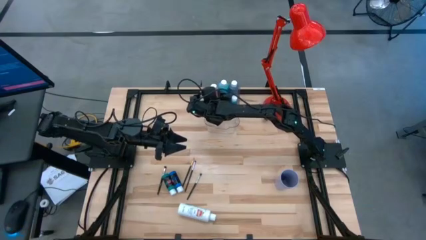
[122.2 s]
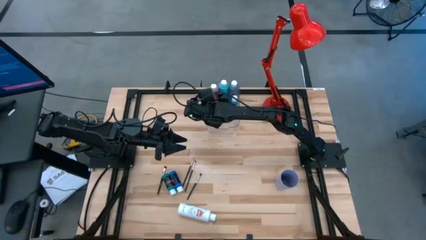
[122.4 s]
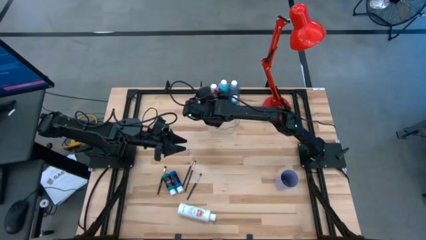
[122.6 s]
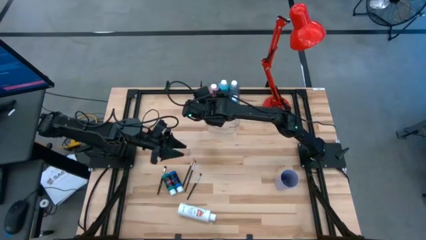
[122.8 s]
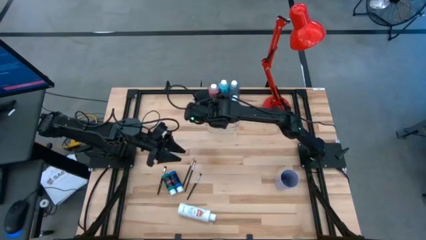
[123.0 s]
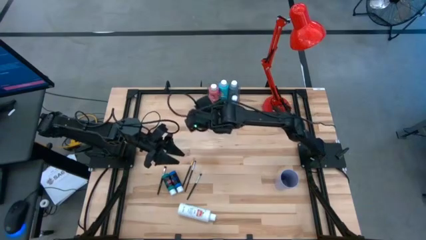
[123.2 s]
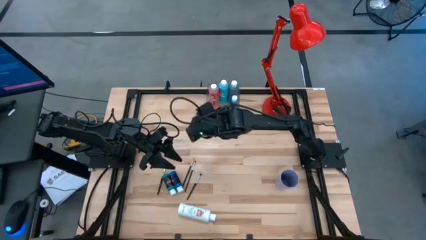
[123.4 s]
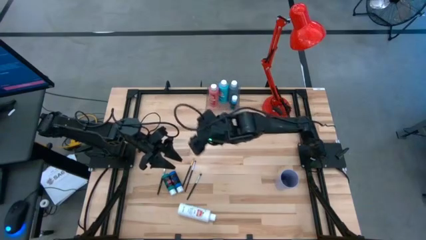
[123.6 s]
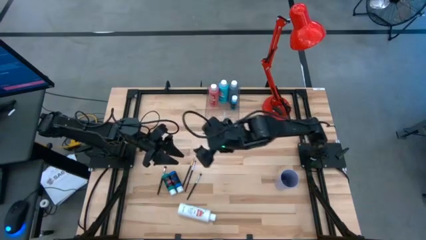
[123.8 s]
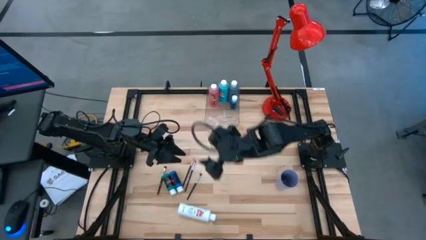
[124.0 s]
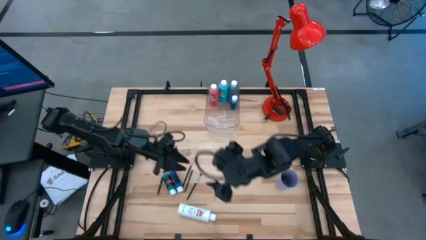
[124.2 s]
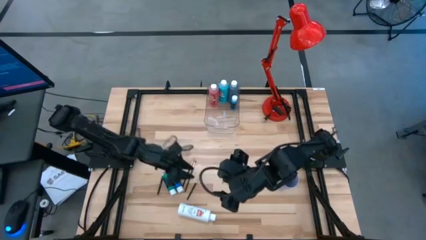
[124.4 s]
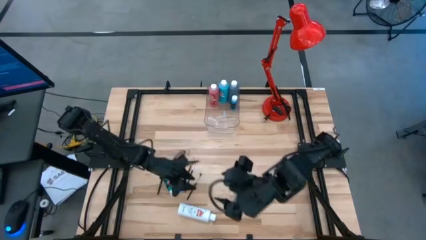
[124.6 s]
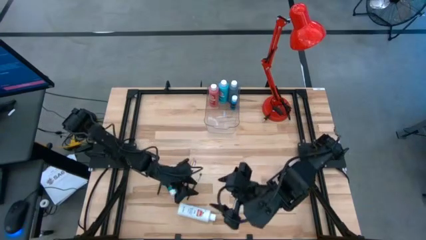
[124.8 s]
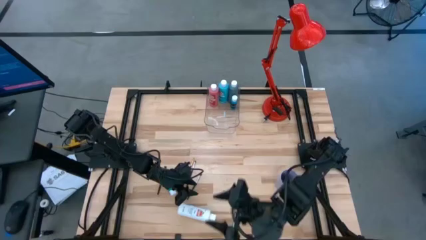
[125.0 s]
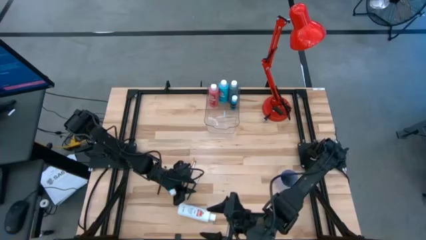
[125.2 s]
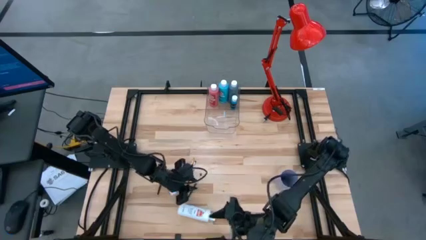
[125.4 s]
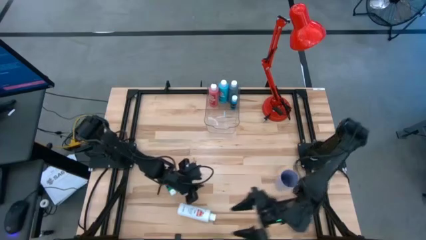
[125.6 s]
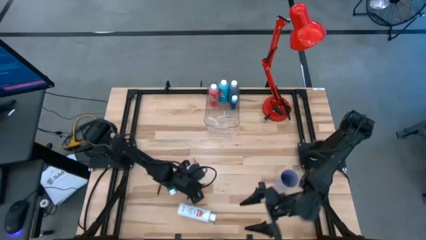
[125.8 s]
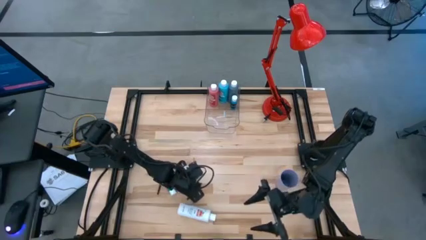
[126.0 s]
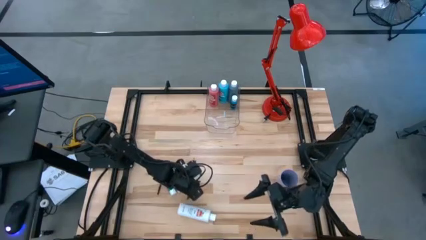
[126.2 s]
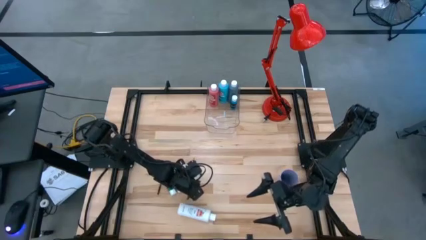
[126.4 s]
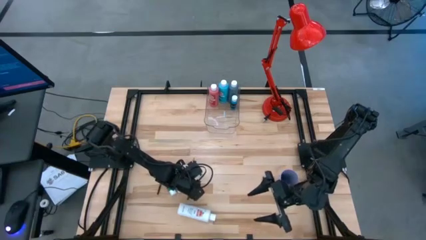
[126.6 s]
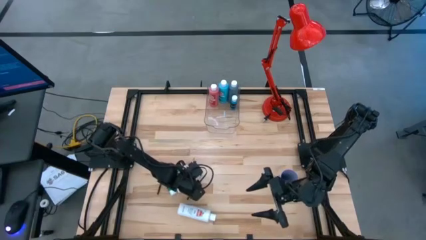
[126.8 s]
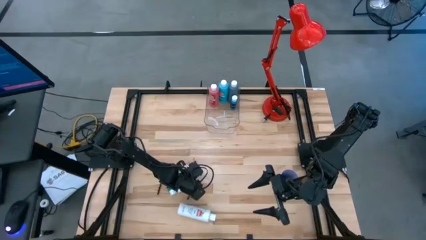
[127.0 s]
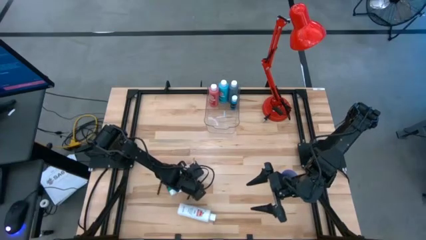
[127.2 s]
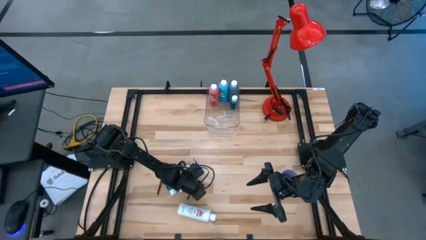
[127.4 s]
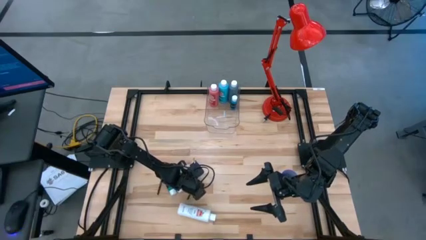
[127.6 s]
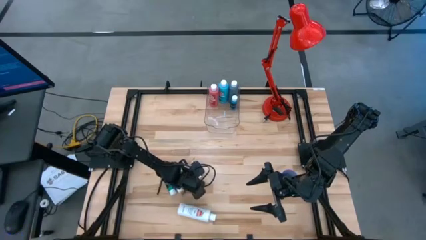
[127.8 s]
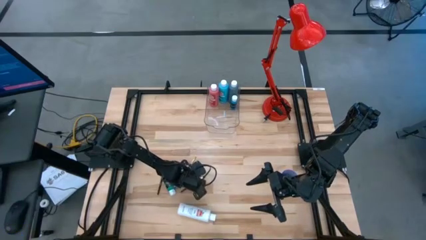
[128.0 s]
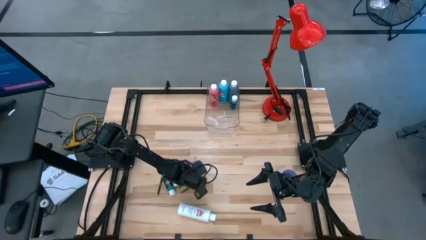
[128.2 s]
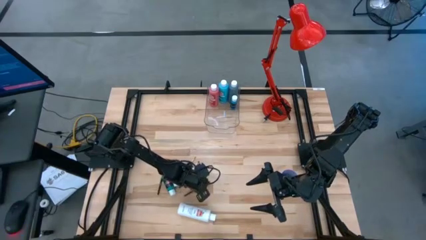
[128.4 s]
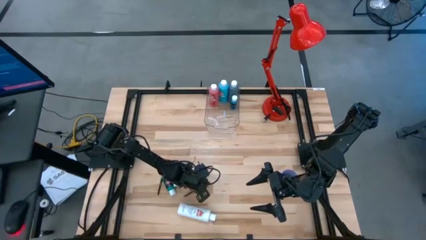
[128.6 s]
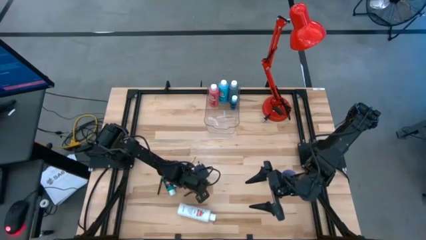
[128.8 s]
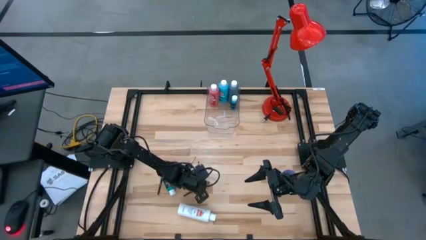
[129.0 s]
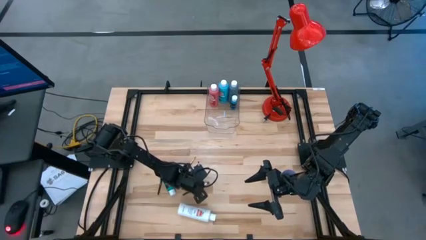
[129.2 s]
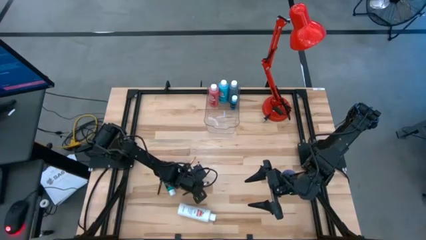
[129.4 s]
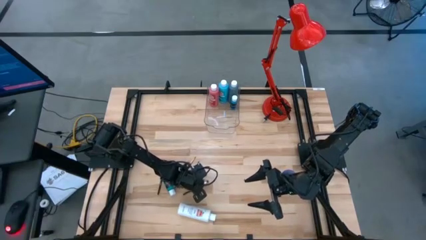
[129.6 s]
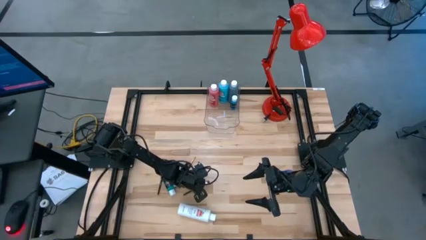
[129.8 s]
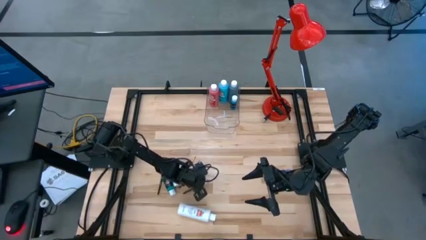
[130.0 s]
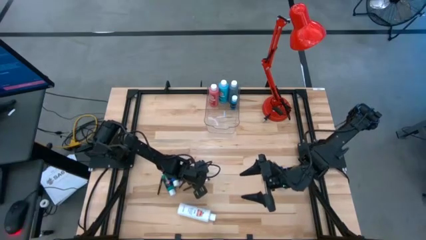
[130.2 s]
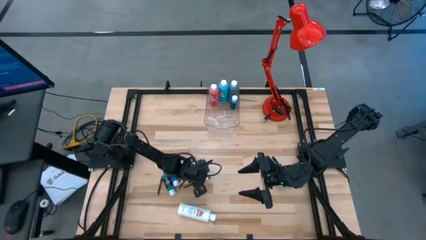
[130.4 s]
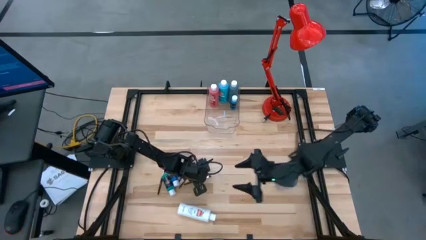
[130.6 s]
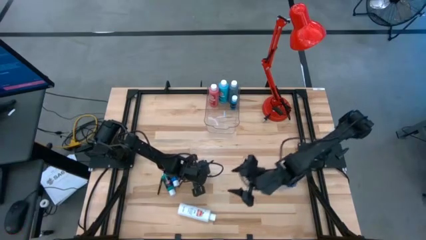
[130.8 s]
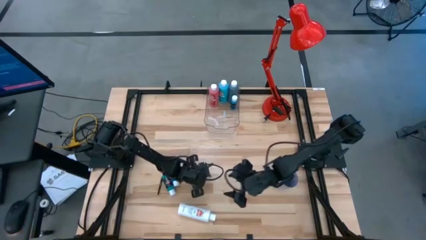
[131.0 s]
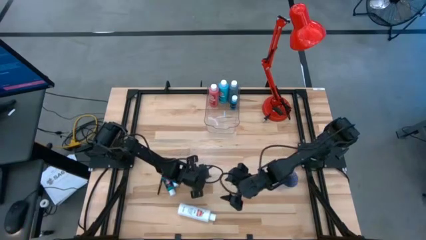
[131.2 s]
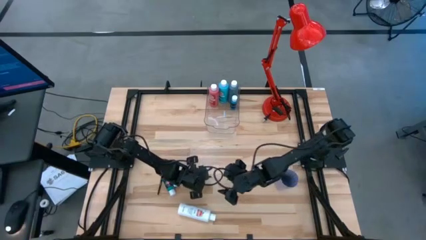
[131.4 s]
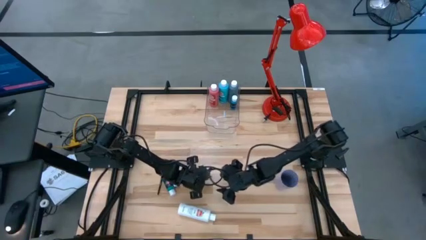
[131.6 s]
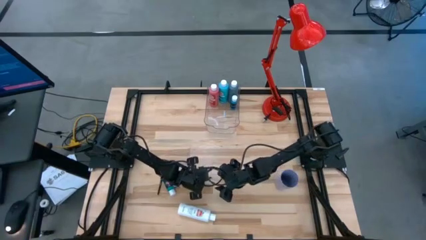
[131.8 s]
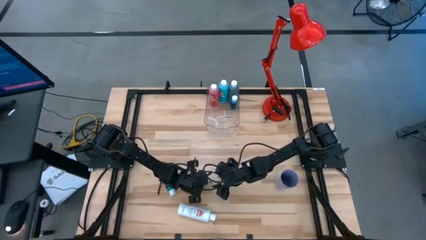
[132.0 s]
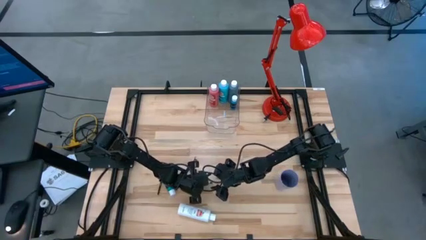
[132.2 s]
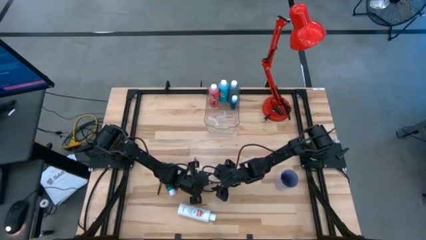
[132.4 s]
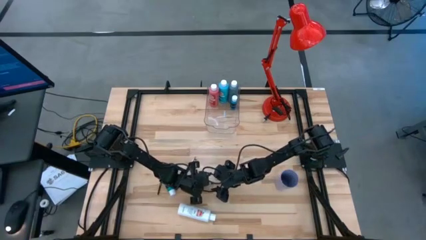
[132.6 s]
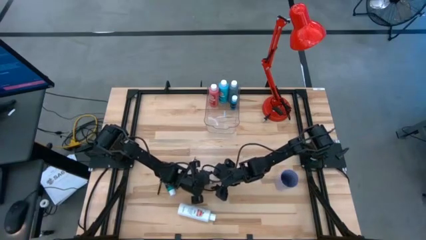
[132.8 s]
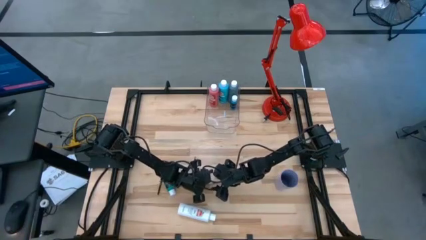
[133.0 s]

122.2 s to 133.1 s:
Task: Pick & Place Paint Supplies
Put the silver paintbrush into the purple cup

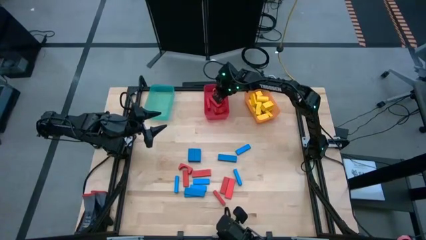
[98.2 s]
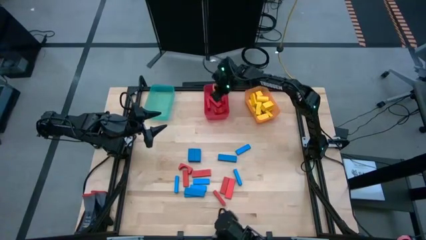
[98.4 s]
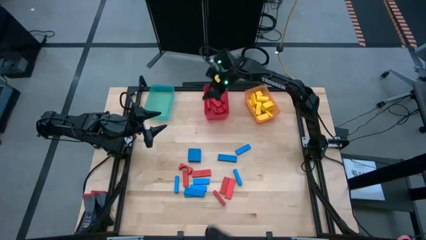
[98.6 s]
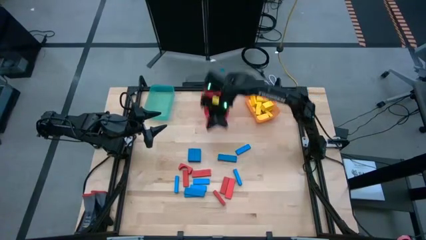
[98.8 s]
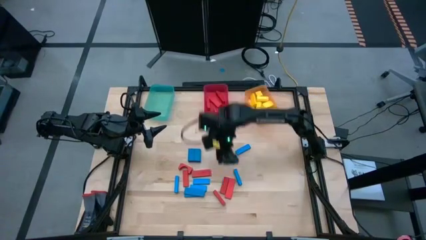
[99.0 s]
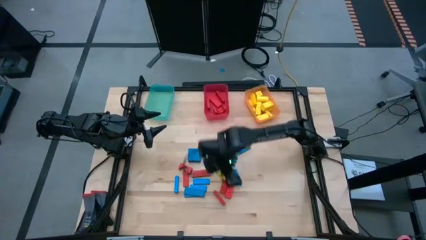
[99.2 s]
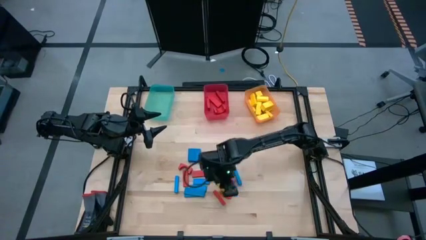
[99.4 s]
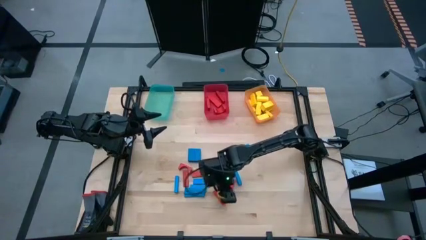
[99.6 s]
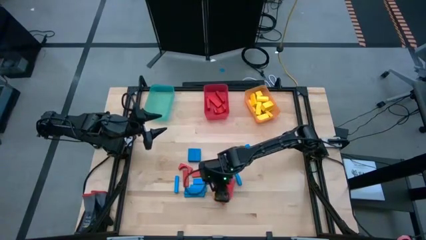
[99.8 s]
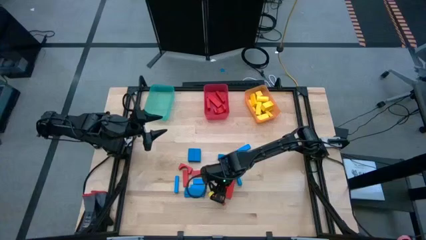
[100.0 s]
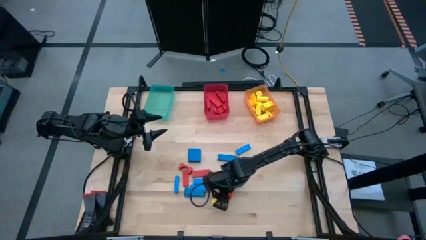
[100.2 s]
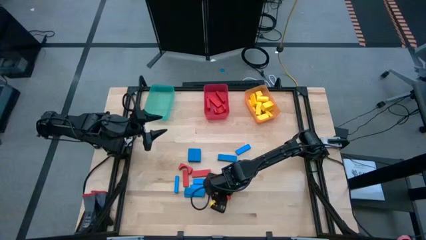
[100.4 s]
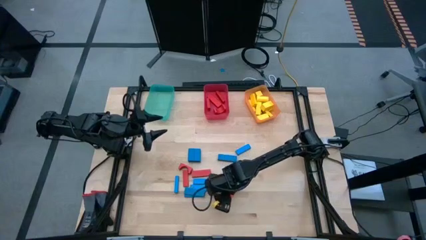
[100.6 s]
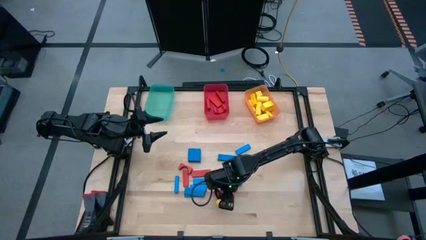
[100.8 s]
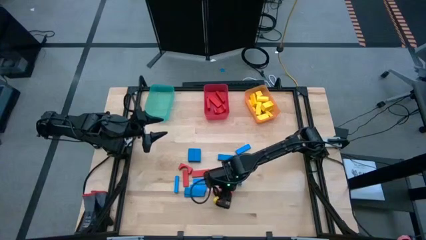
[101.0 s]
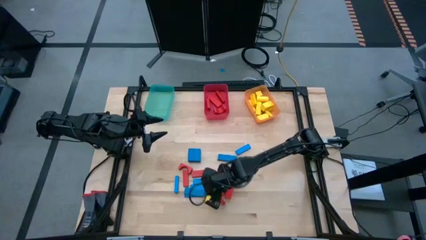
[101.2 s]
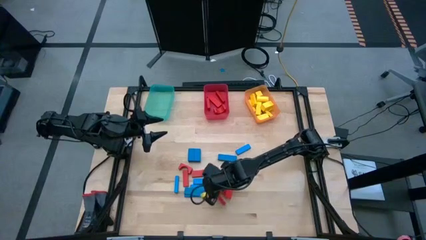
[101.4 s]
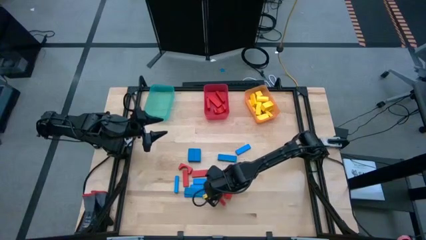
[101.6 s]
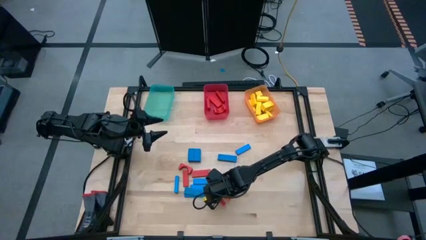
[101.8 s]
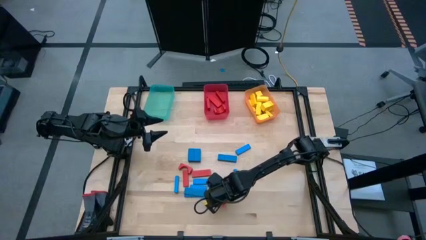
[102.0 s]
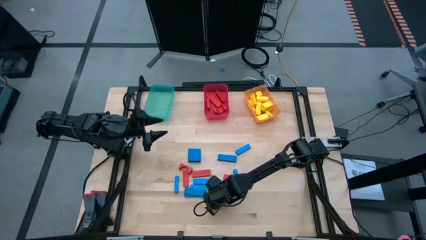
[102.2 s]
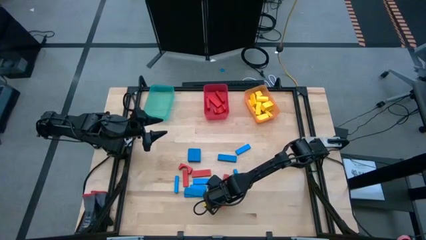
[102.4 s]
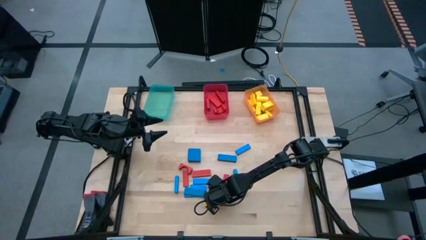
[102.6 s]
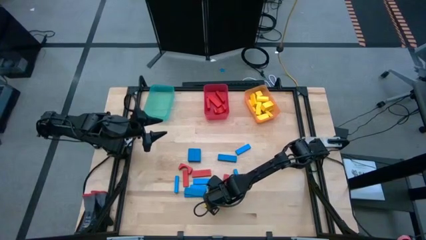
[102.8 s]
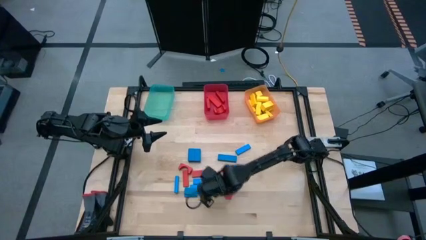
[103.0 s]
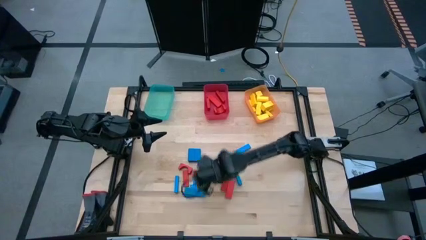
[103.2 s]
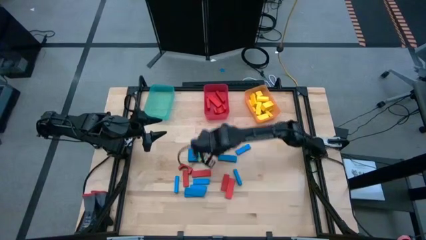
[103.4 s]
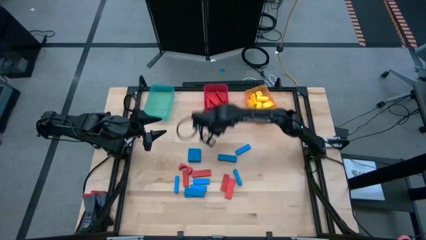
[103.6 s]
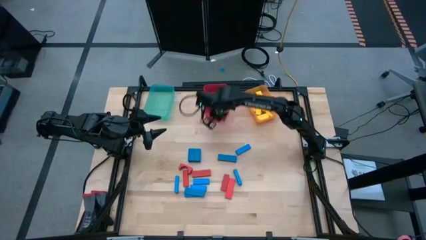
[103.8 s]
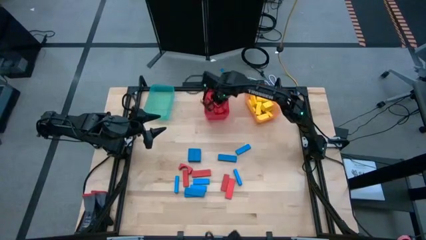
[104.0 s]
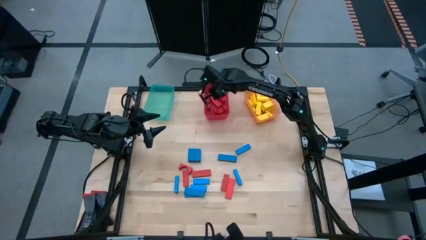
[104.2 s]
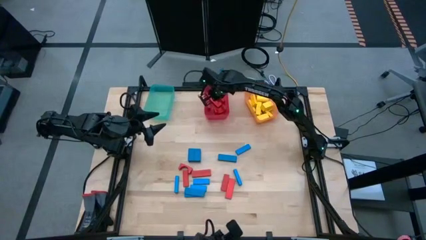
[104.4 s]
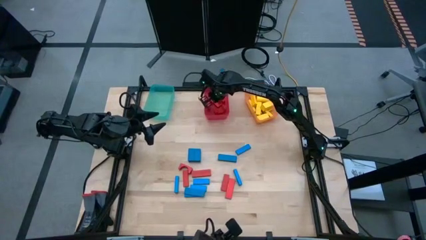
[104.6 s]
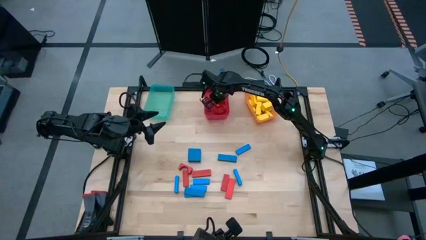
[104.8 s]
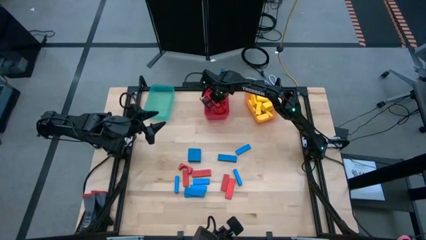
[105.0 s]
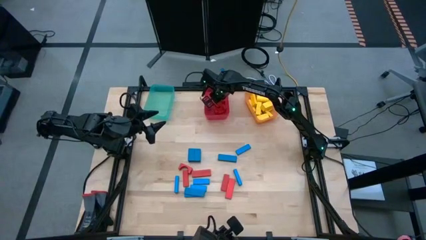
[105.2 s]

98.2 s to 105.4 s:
Task: Sort blocks
Put the red block into the red bin
